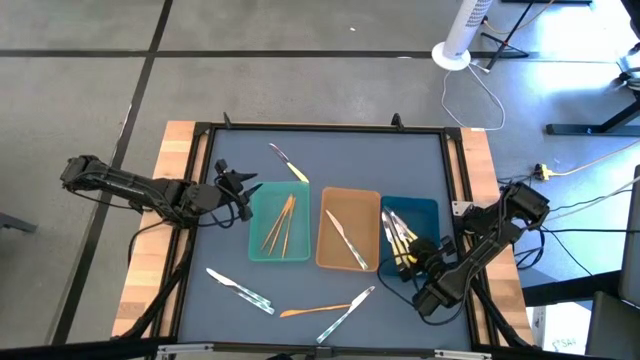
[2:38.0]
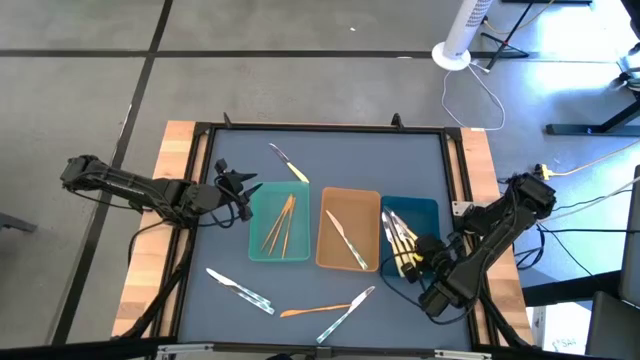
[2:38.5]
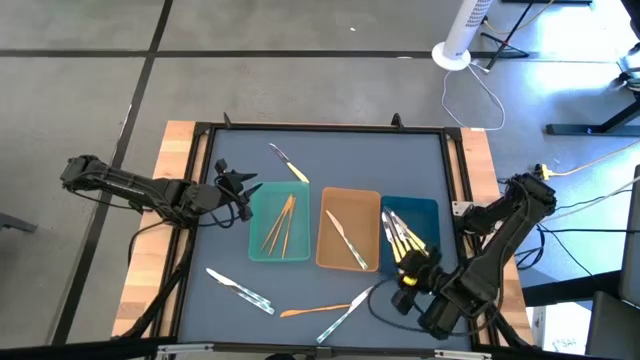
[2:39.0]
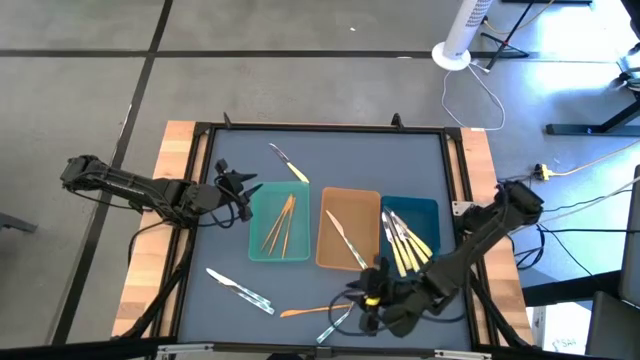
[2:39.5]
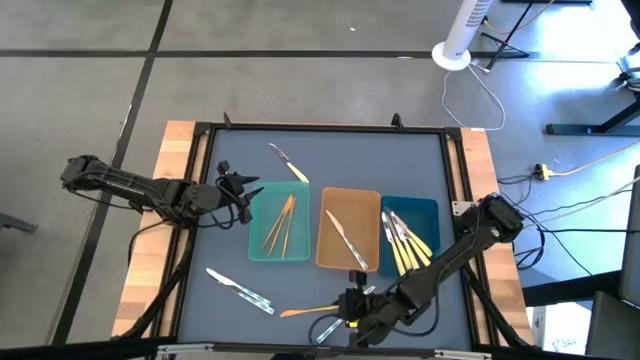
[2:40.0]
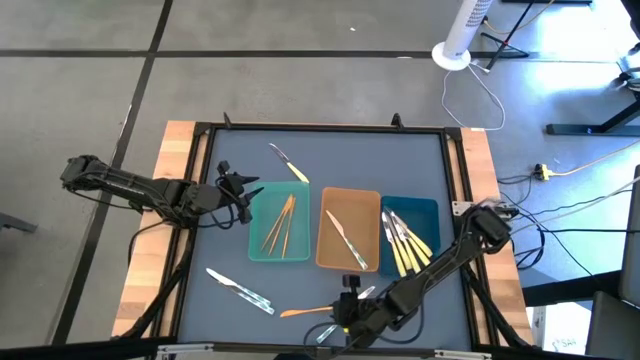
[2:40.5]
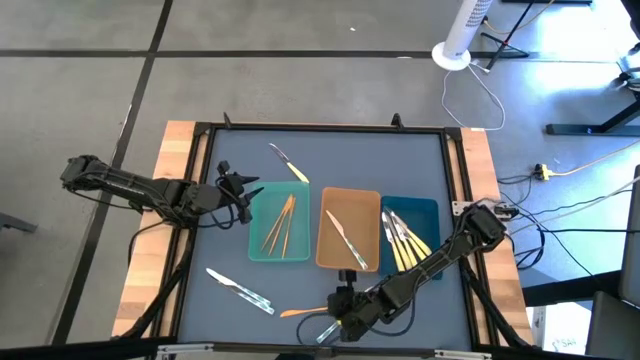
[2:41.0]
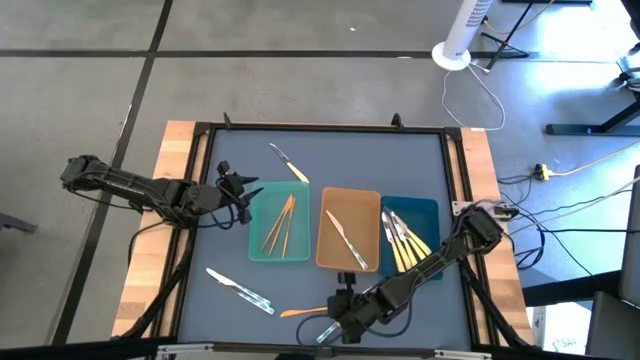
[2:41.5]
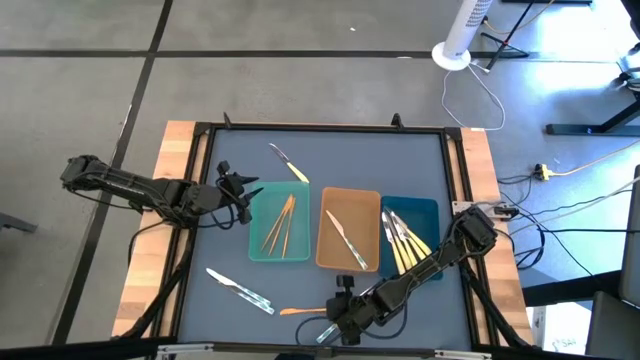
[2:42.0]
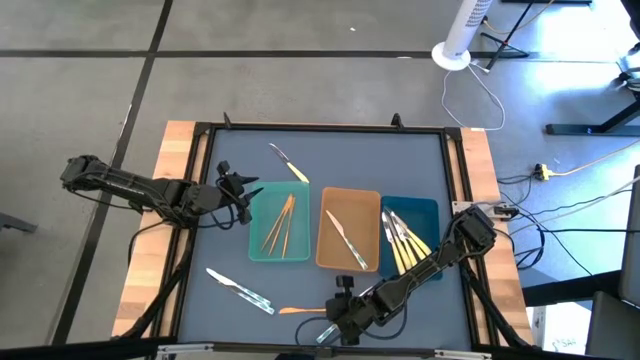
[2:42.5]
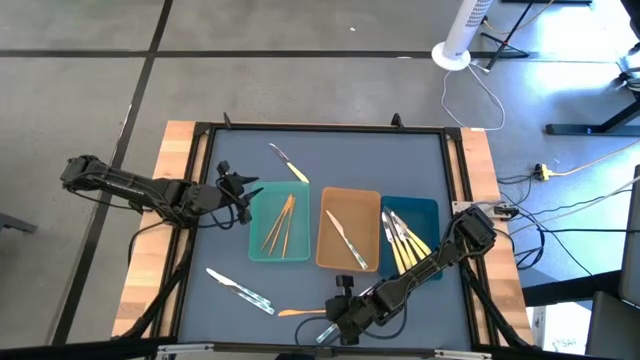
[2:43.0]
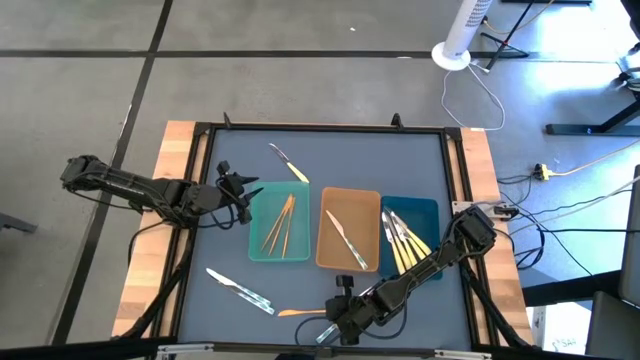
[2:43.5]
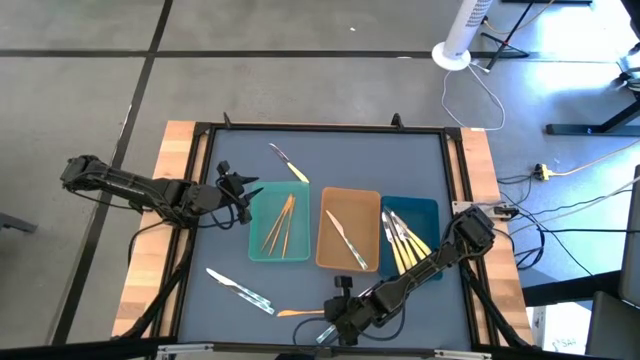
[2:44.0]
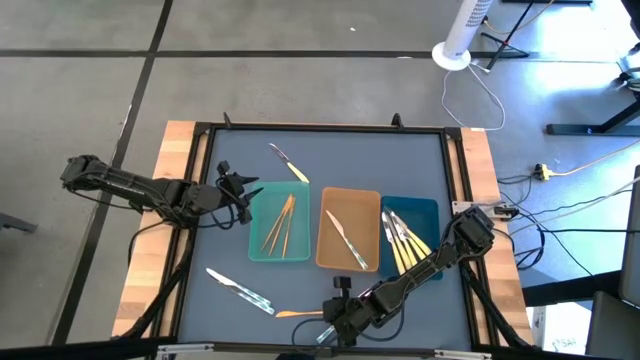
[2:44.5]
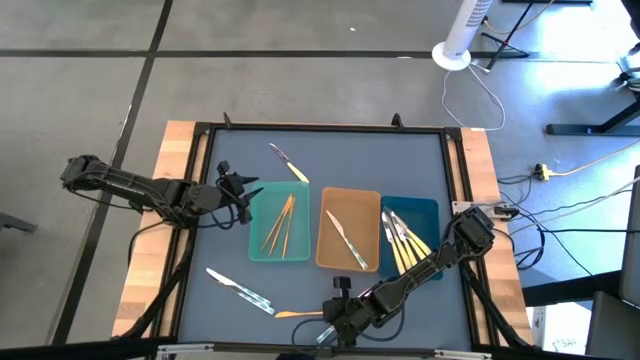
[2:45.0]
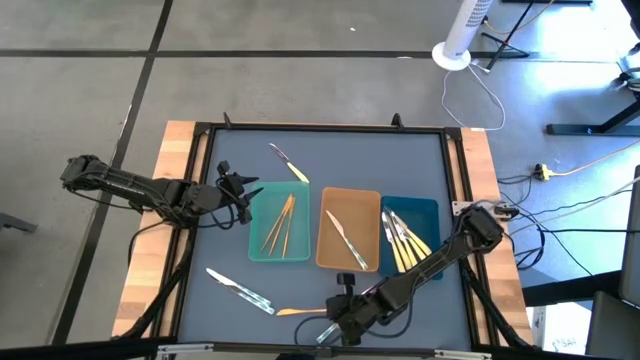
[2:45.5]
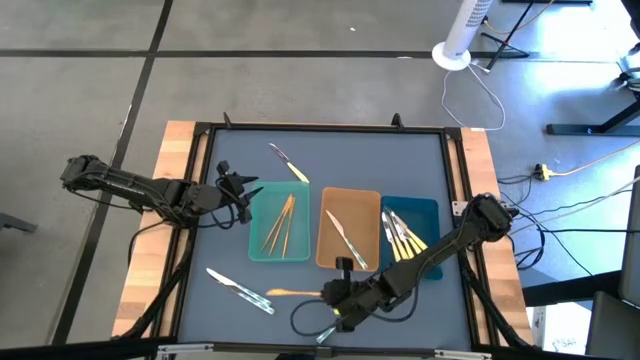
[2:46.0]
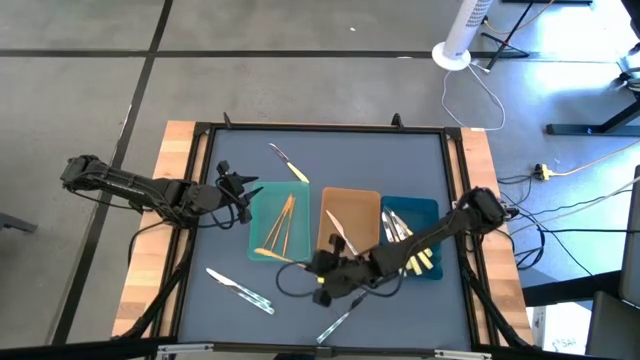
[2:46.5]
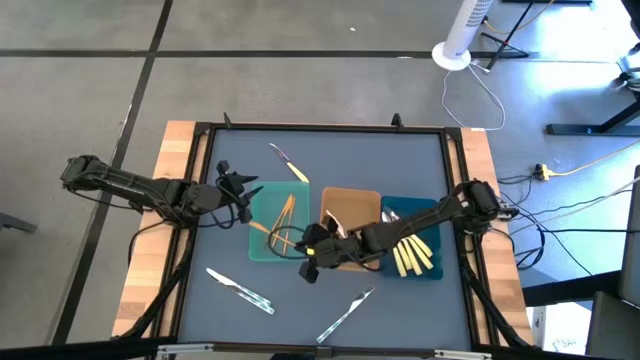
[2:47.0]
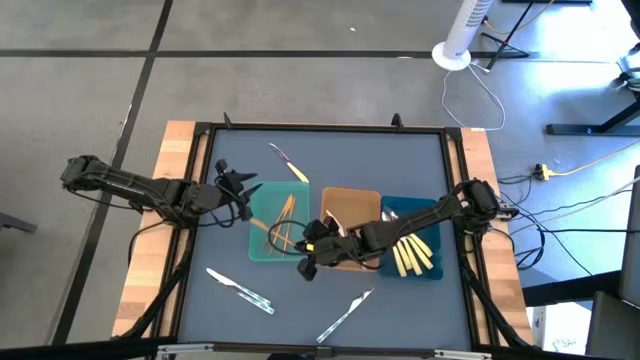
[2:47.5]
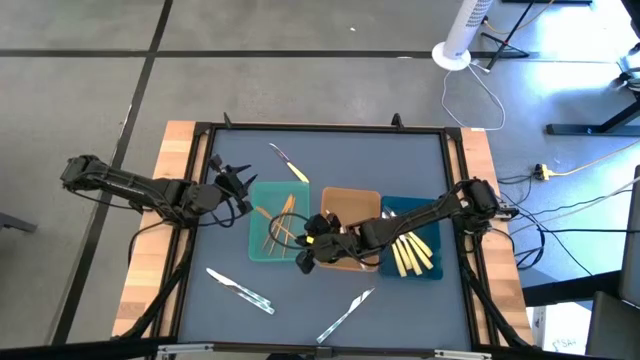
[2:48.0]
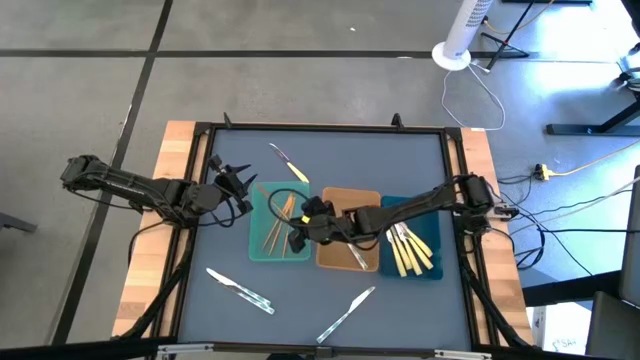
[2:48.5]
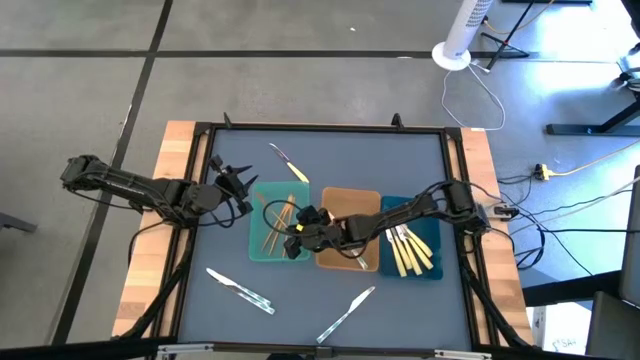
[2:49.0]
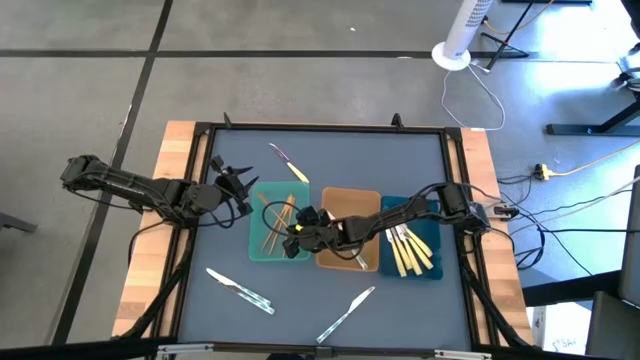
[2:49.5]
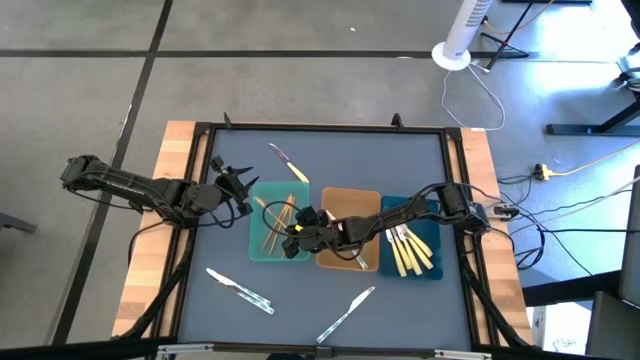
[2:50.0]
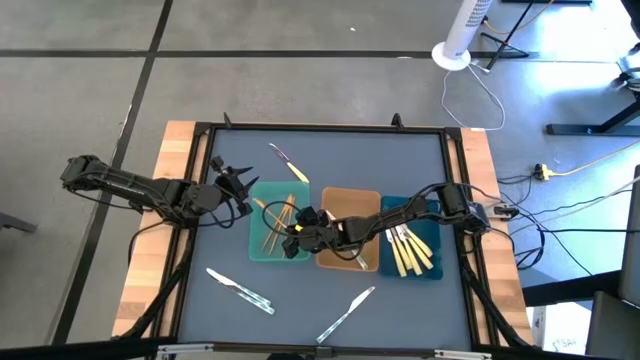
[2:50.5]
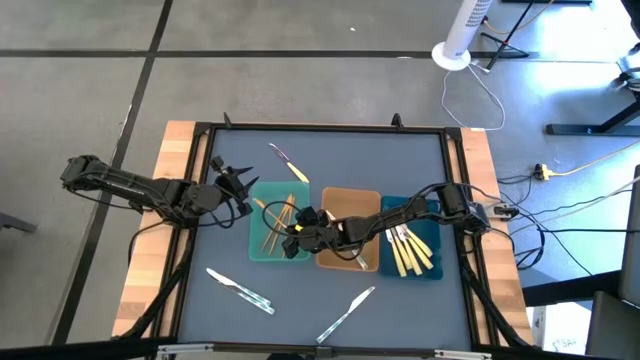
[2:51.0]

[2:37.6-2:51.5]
Task: Sort silverware by color (type)
Put the gold knife into the green bin

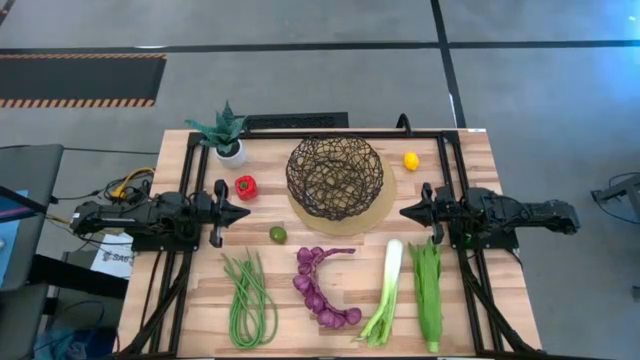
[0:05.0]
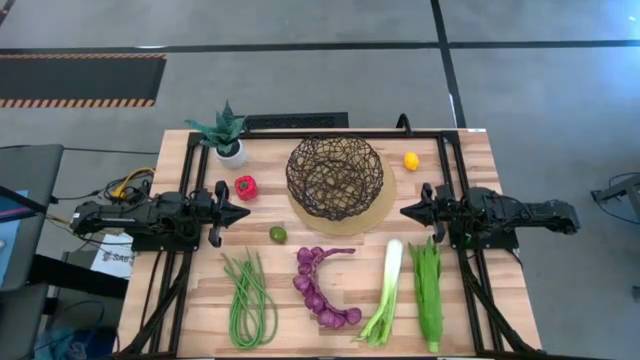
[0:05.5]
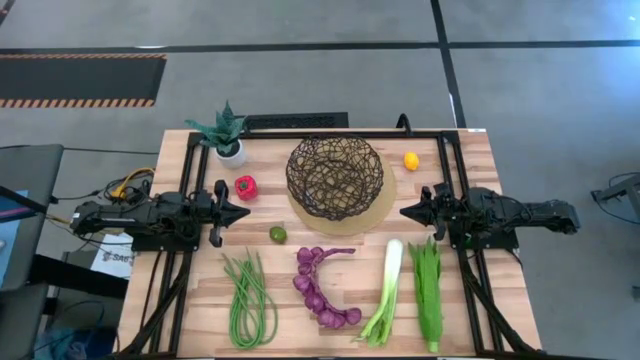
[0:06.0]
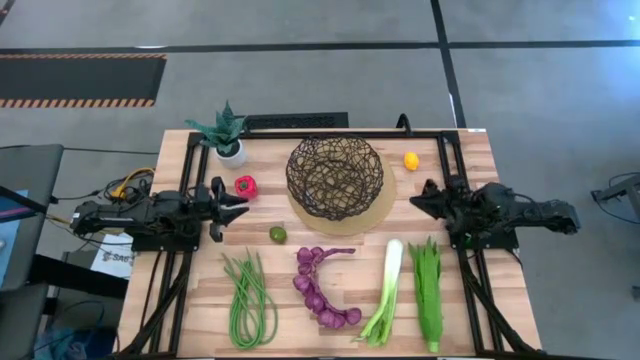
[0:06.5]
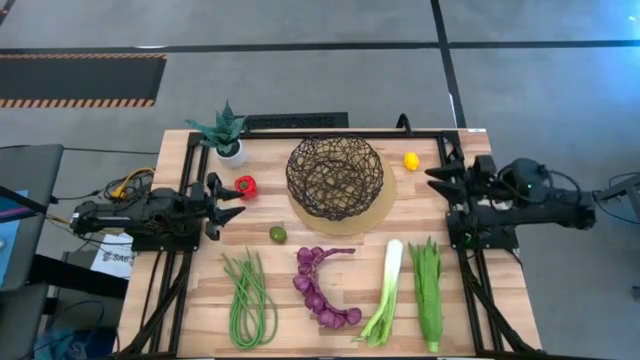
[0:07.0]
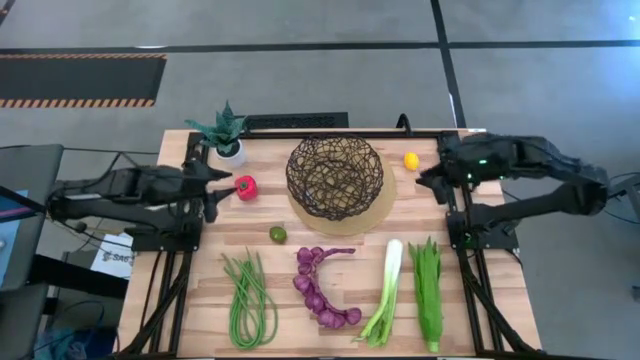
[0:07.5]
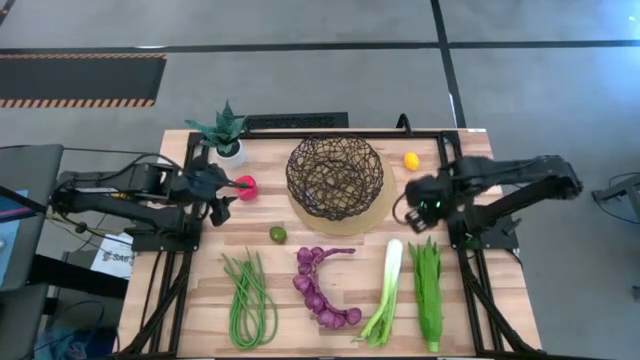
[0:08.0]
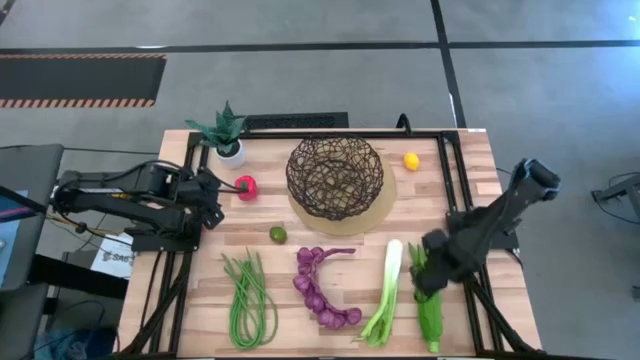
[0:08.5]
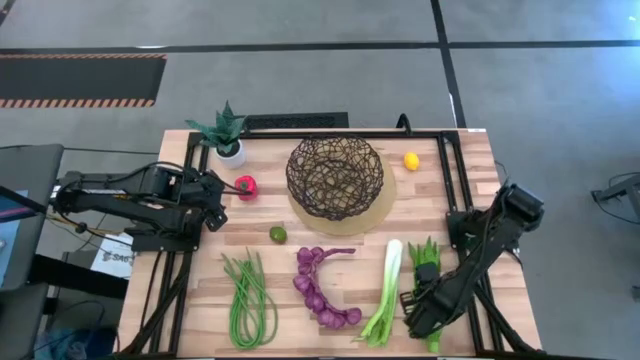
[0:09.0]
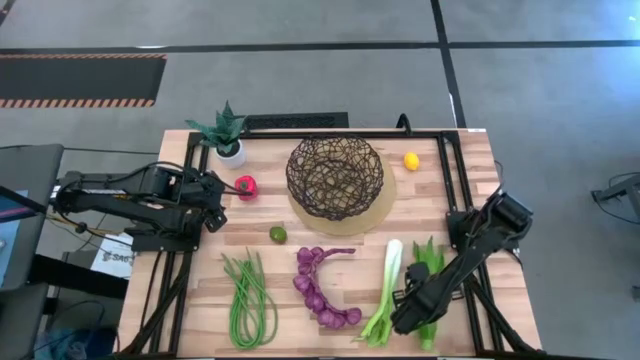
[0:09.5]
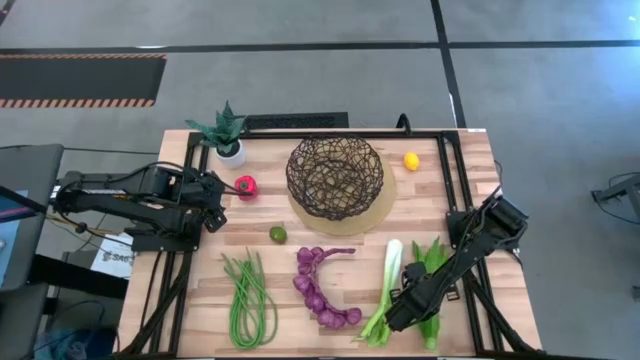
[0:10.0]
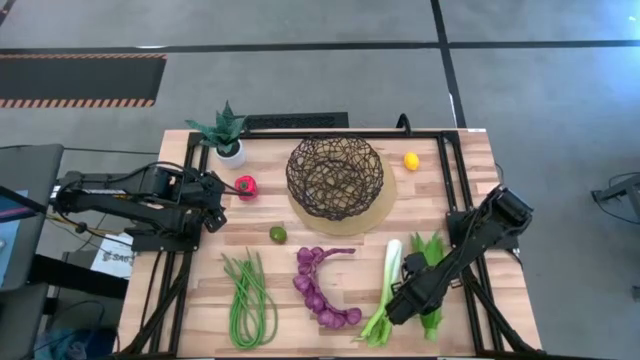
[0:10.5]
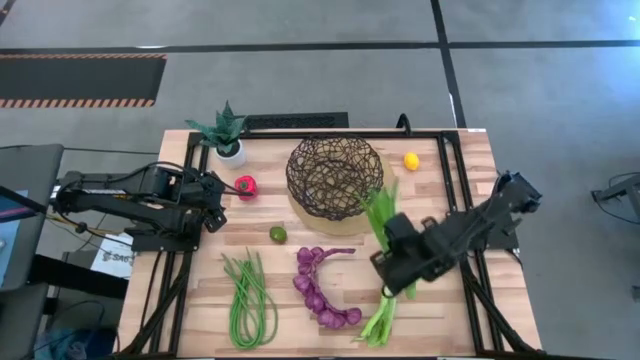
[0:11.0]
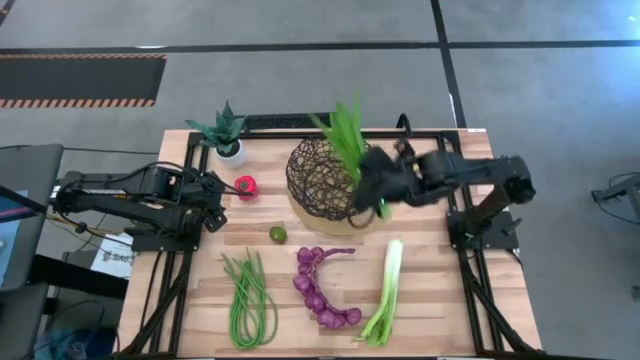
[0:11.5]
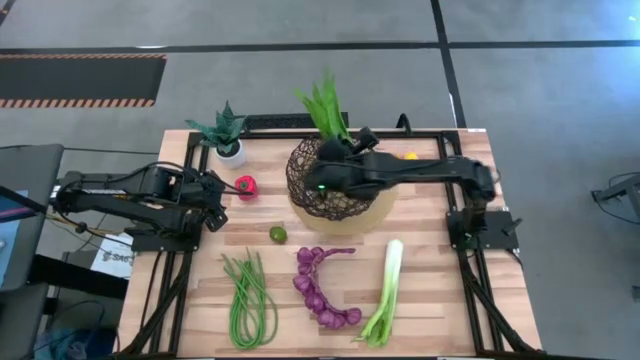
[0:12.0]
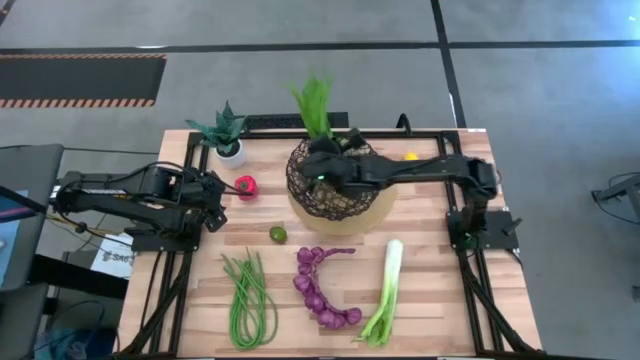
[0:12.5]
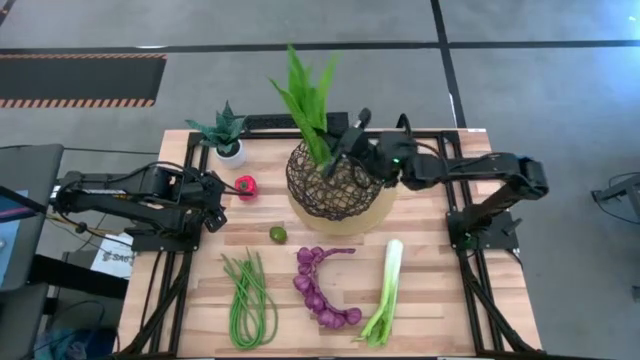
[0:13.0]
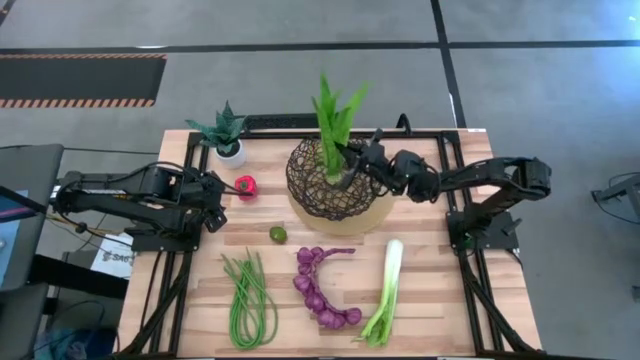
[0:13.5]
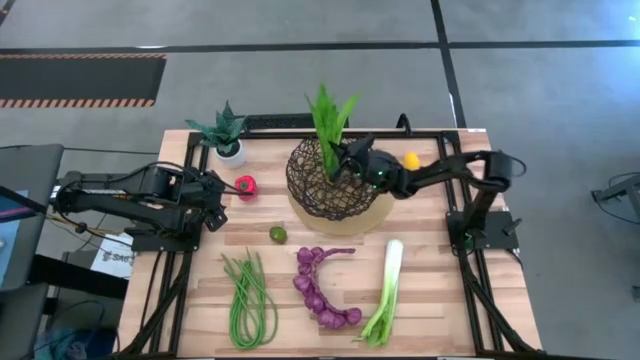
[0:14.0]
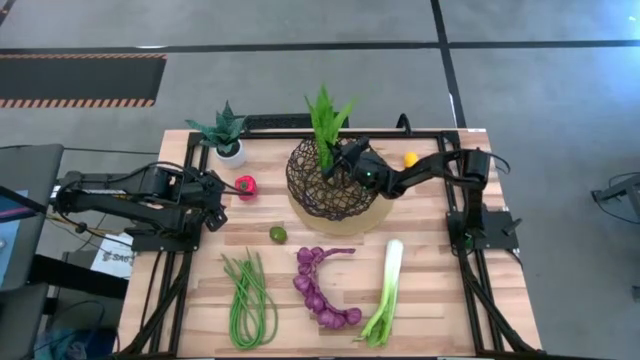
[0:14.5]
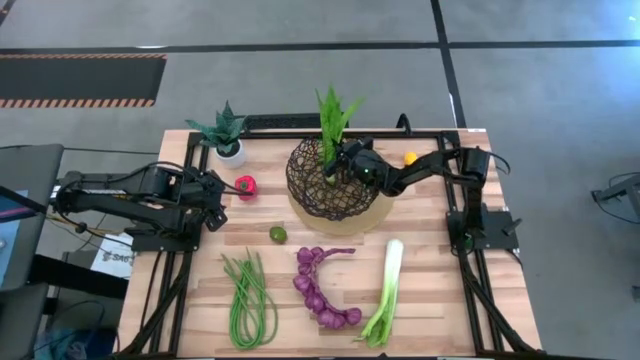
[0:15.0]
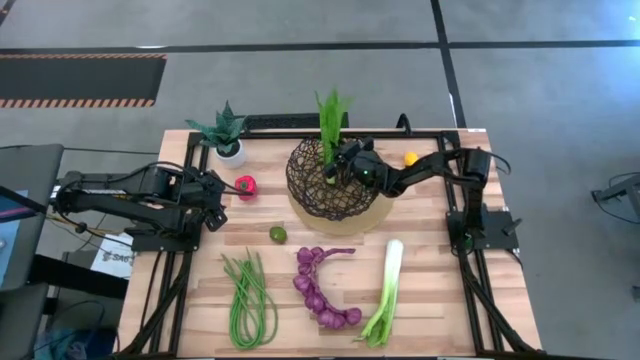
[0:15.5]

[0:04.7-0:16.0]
Task: Build produce basket
Put the lettuce into the basket
